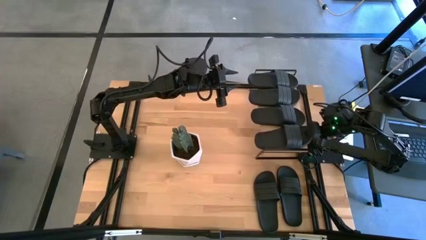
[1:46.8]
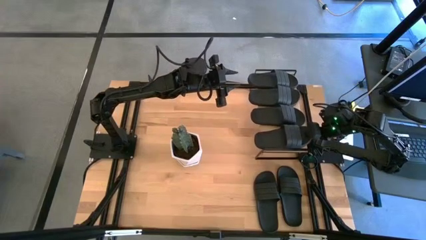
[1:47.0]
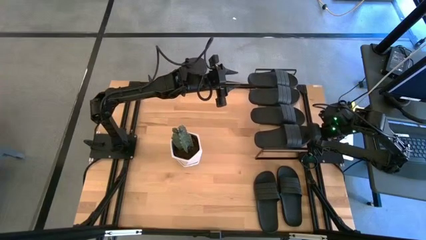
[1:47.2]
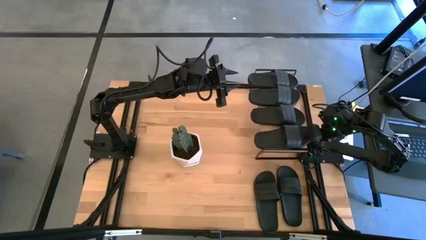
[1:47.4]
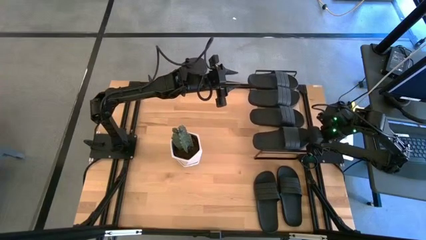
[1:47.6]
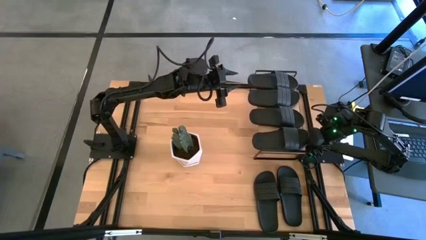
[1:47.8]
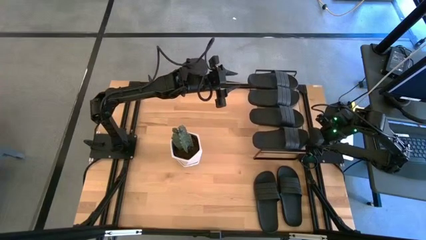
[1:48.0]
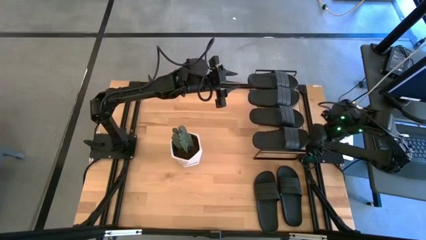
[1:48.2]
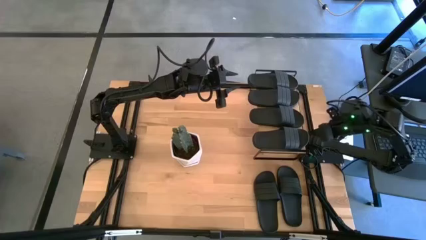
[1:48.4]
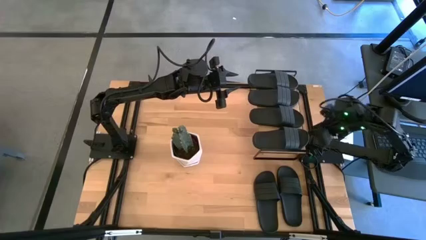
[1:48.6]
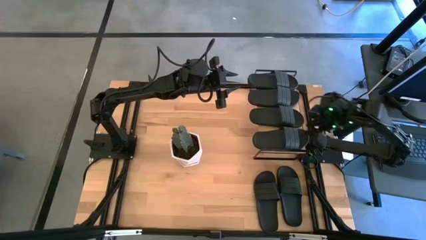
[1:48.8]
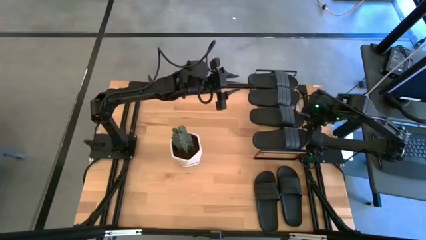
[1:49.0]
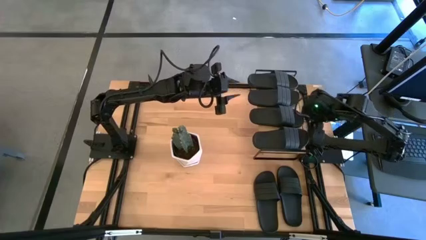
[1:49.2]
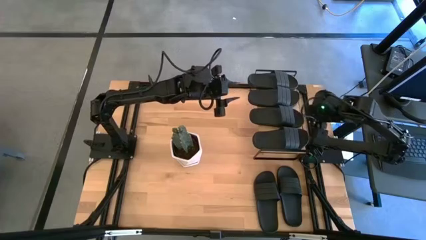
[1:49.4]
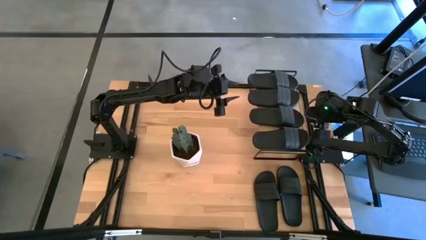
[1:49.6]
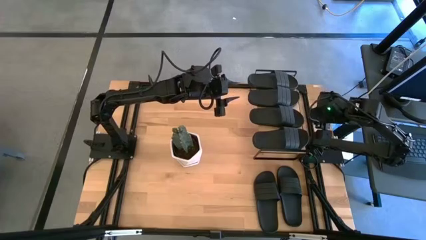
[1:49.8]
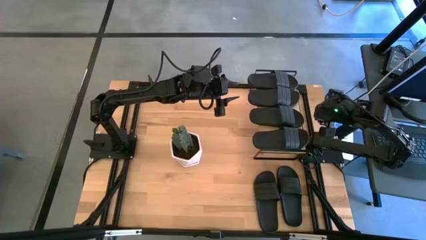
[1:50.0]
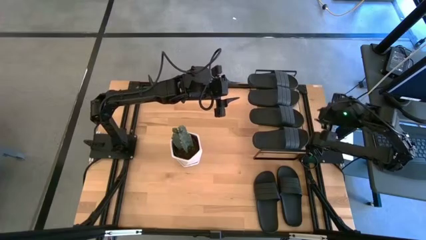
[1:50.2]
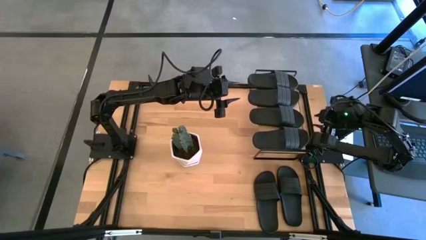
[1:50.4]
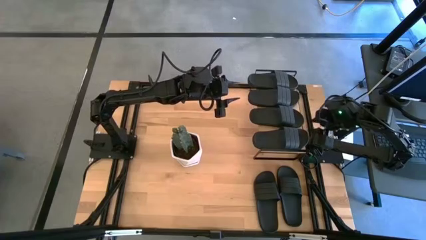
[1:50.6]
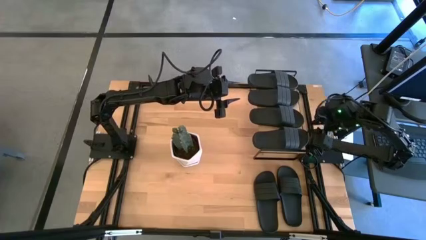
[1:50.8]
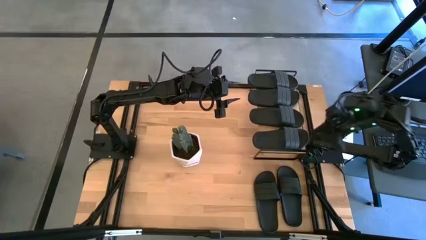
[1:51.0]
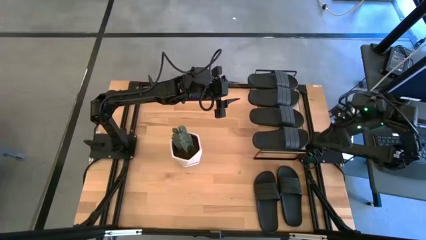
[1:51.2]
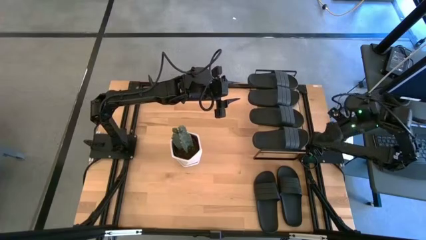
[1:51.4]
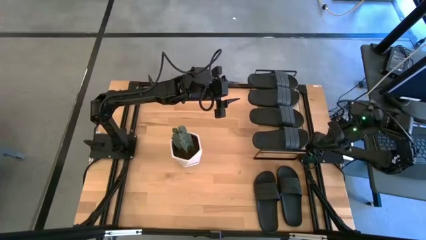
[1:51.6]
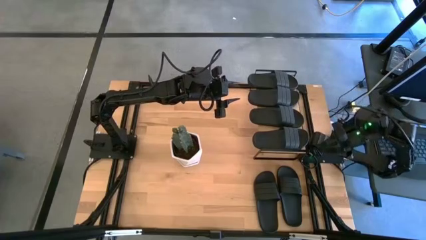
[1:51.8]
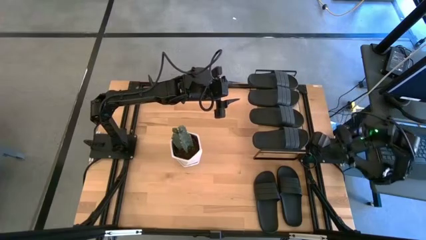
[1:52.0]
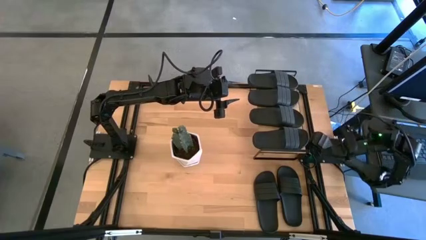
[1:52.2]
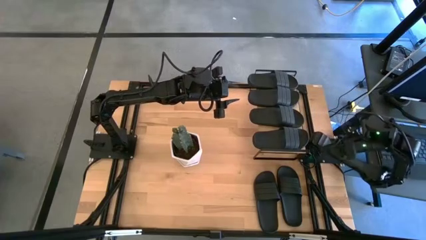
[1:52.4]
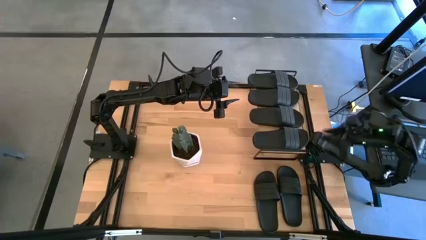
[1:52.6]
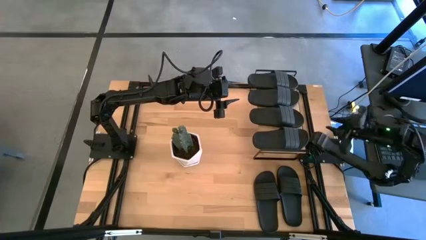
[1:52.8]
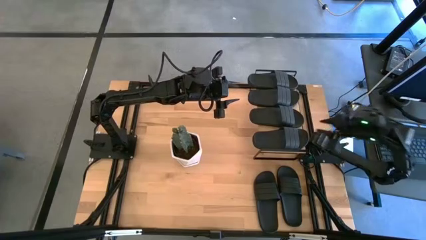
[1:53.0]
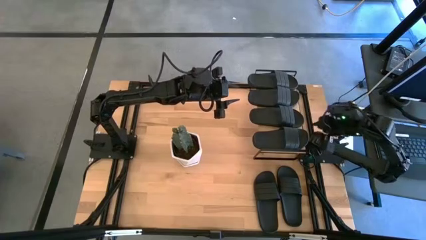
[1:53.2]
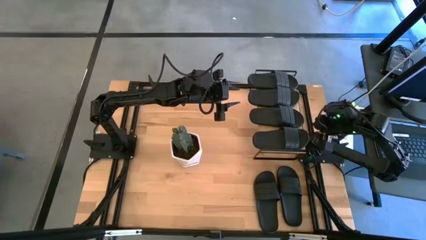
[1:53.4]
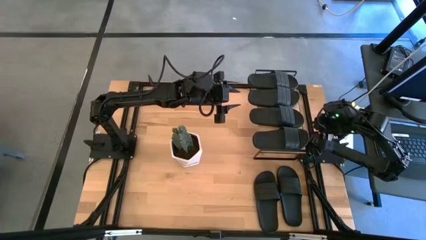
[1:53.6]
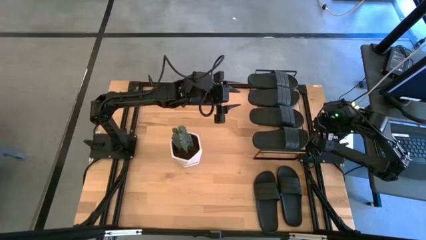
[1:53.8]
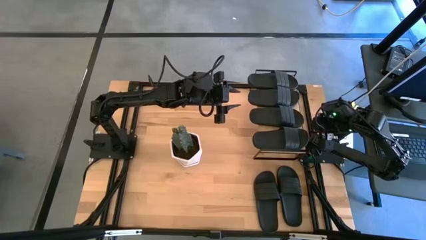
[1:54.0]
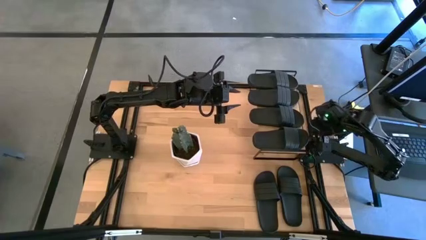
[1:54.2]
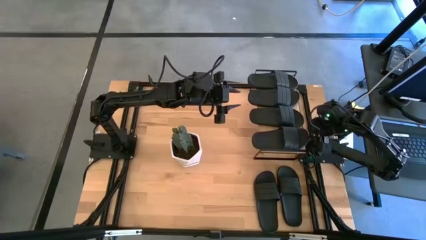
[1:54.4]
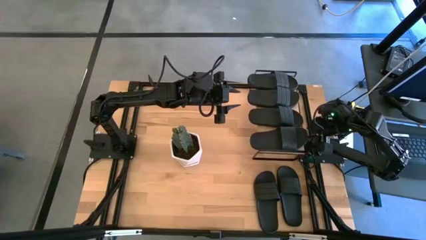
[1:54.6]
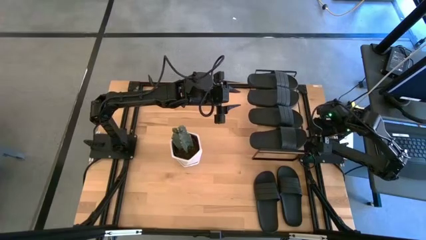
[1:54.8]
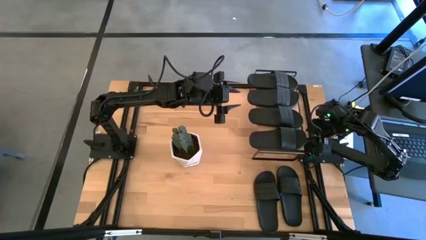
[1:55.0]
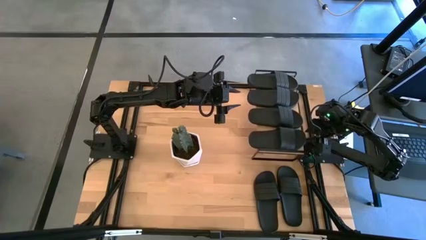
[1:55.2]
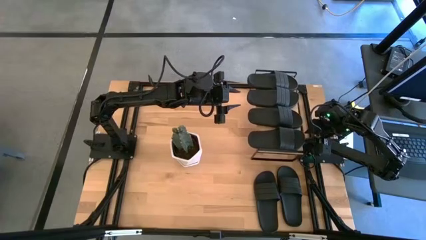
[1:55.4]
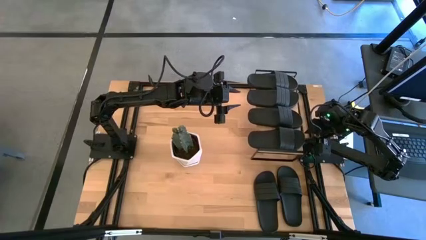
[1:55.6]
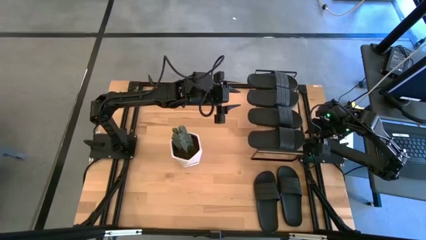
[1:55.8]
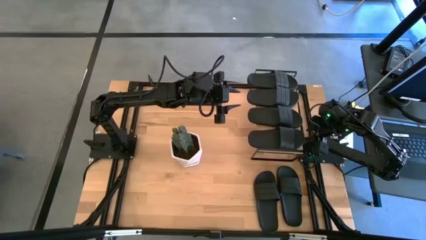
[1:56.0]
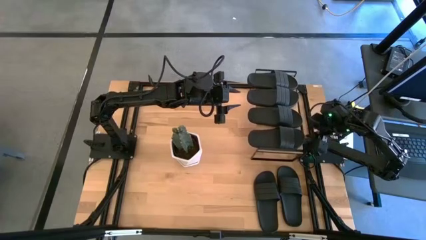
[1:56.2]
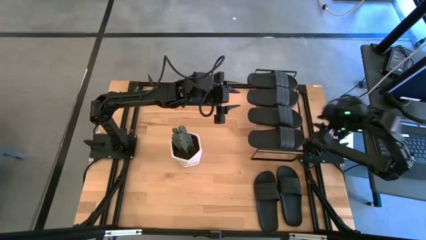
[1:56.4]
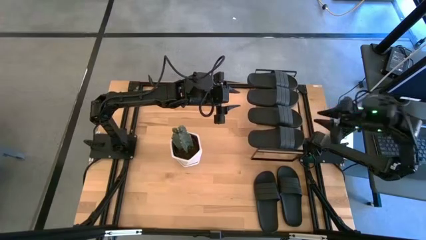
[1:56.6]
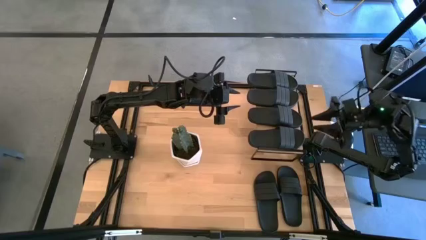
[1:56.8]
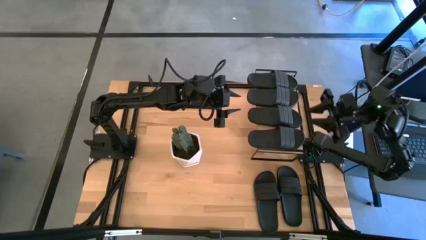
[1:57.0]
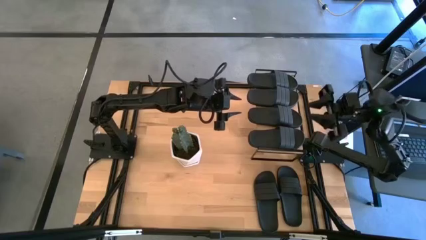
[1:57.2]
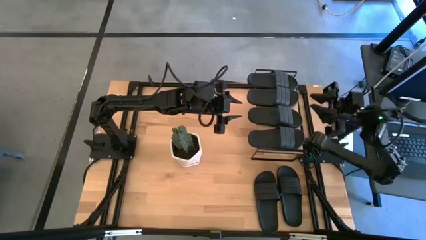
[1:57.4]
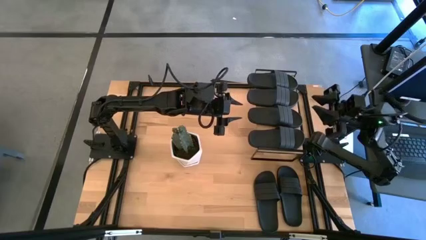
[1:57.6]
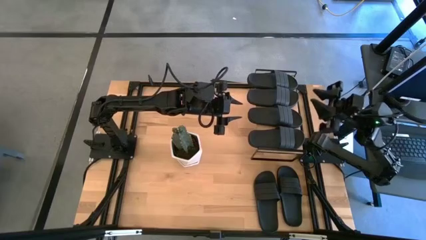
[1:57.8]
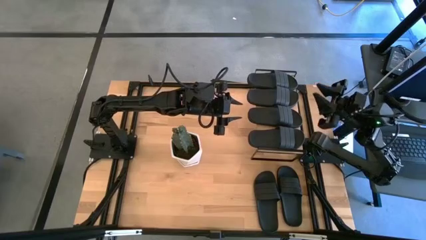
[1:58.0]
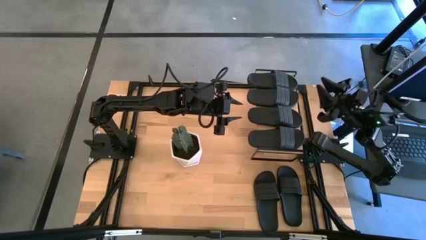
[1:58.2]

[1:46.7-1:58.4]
Task: Pick and place slides into the shelf
Put the black slide on the shelf
